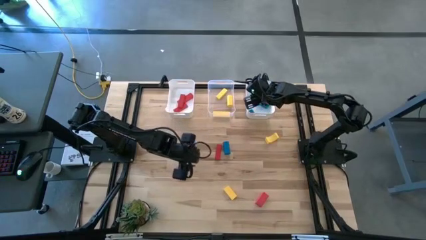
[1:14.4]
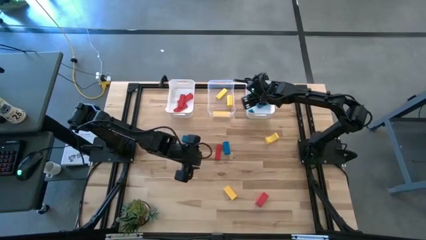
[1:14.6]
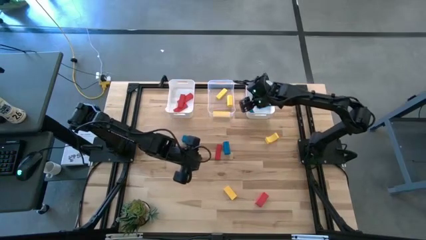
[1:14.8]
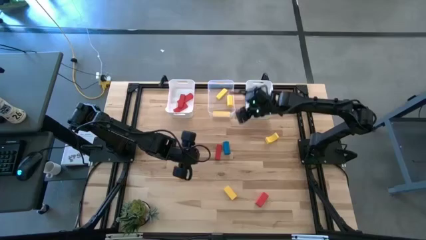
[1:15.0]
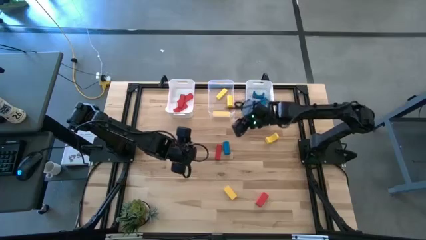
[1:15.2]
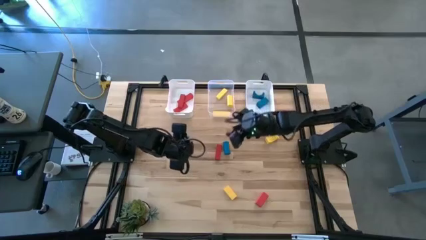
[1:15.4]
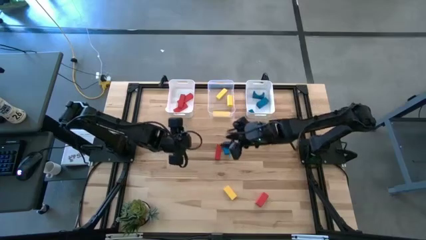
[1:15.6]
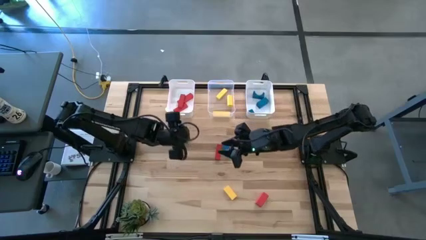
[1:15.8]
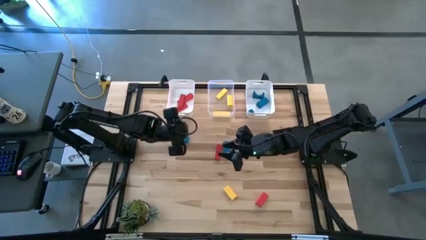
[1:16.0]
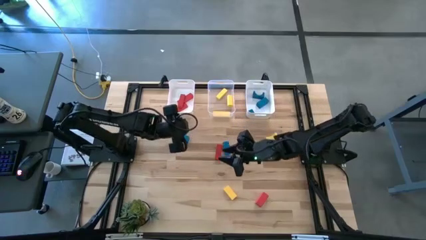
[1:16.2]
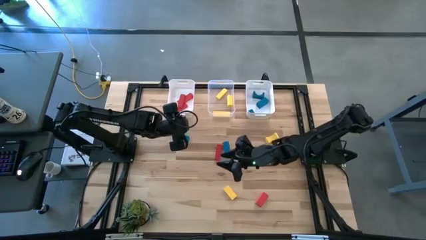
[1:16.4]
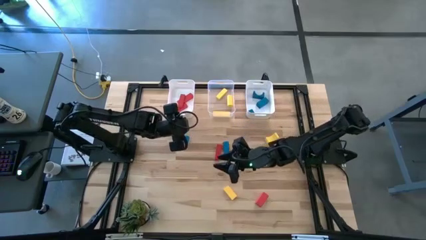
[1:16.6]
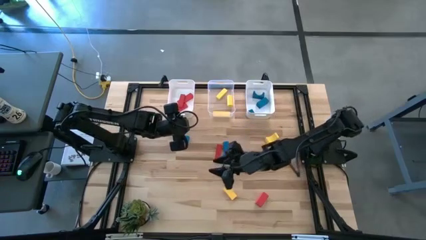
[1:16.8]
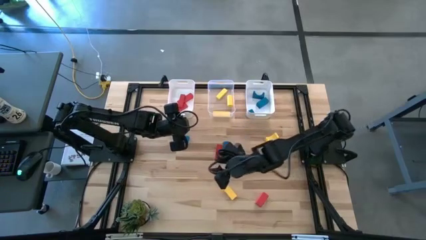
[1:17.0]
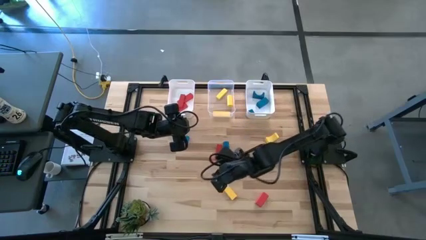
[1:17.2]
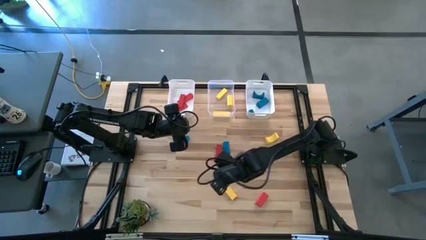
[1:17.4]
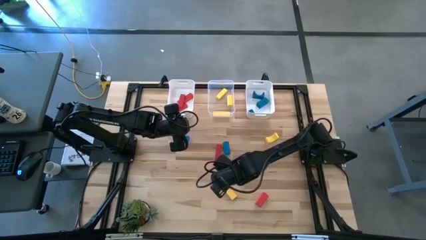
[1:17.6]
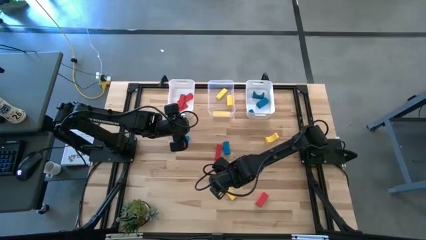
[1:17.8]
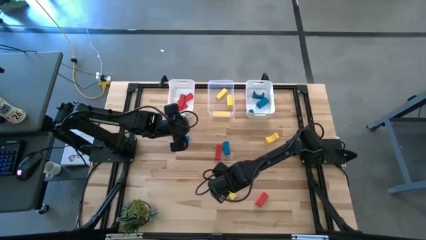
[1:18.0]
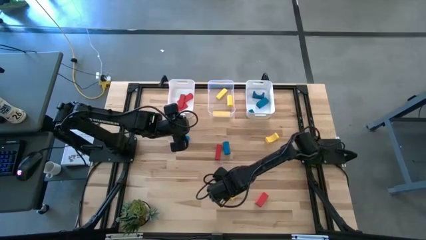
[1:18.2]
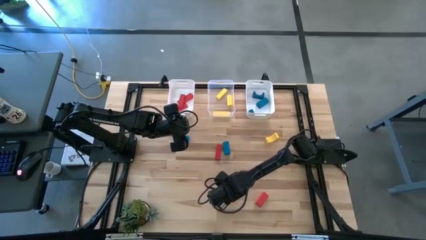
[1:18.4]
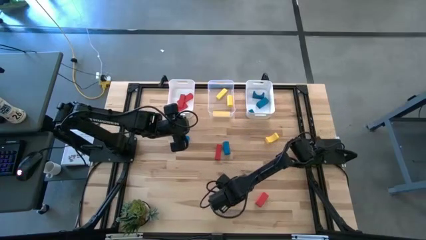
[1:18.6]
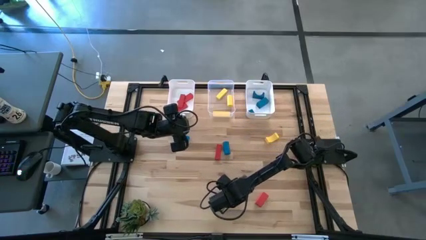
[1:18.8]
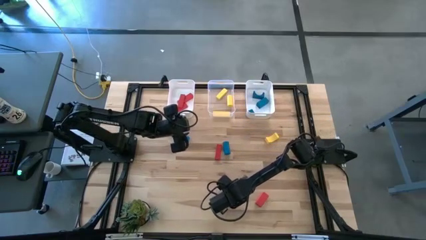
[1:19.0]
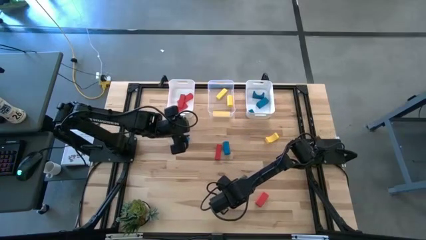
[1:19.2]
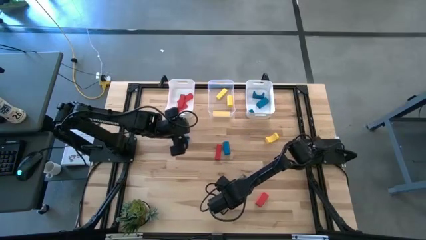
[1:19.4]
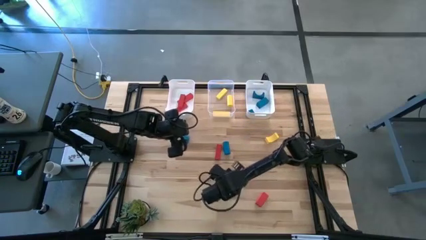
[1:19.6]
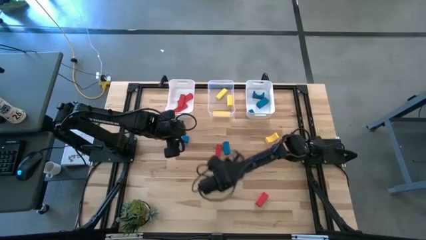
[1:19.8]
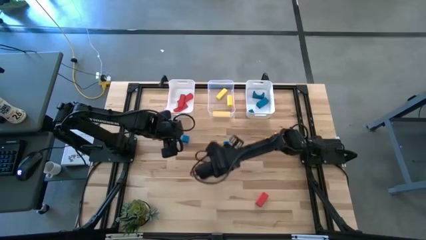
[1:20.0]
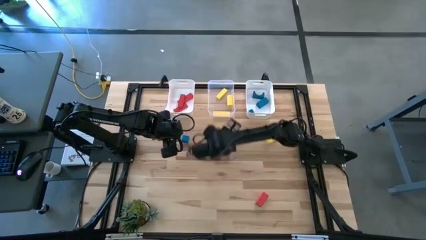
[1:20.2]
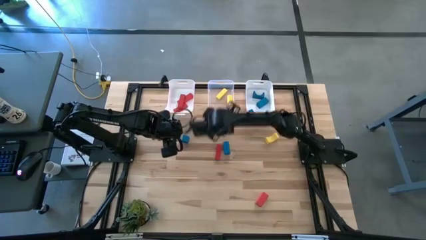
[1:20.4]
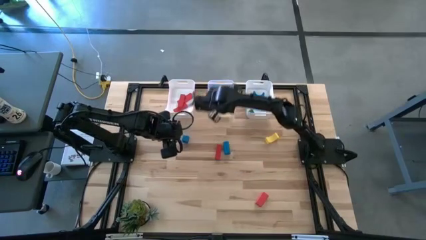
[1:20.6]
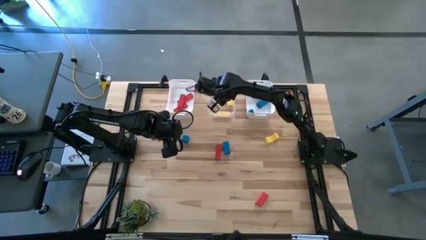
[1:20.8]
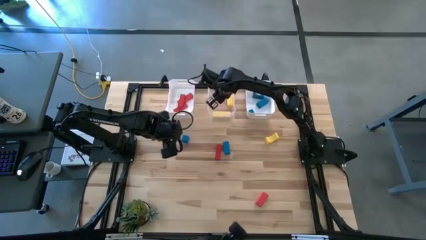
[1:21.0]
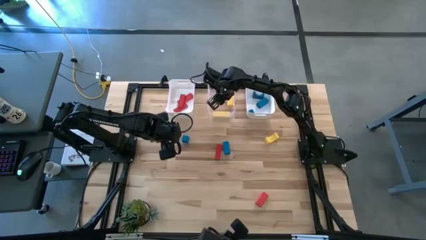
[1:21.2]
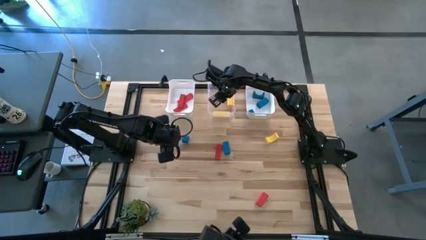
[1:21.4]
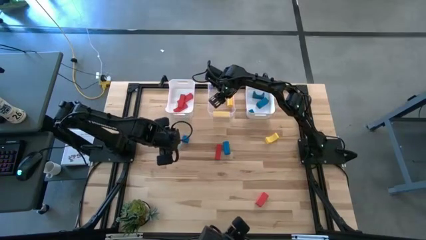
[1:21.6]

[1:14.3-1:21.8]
Task: Sort & place blocks by color
Put the yellow block into the transparent bin

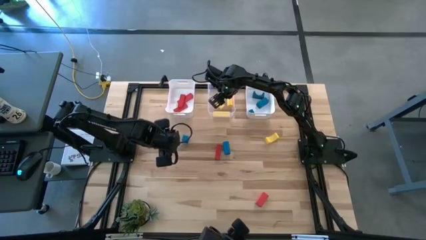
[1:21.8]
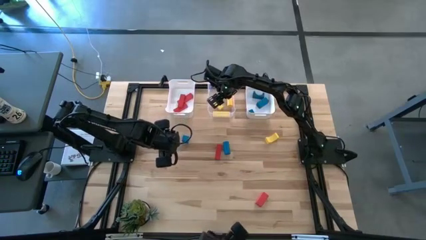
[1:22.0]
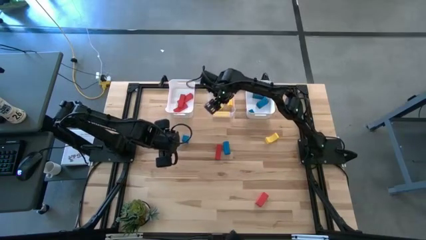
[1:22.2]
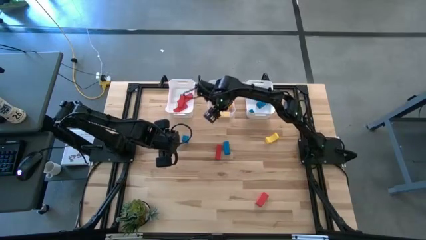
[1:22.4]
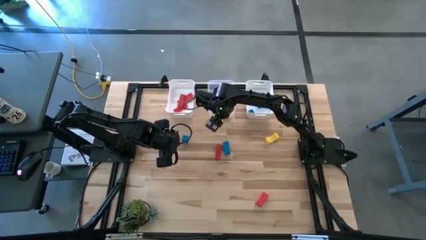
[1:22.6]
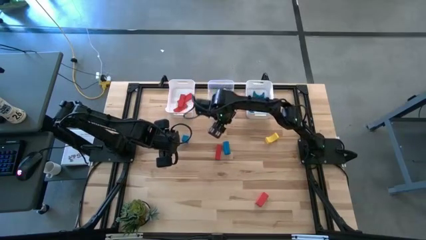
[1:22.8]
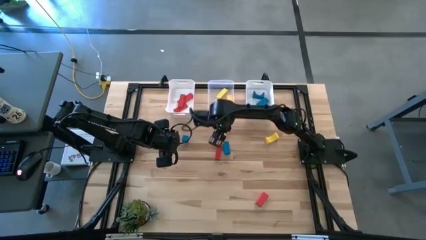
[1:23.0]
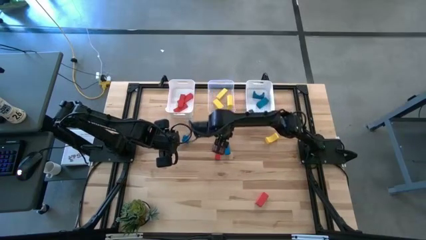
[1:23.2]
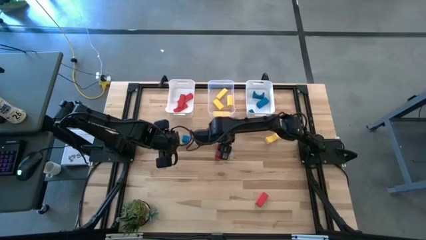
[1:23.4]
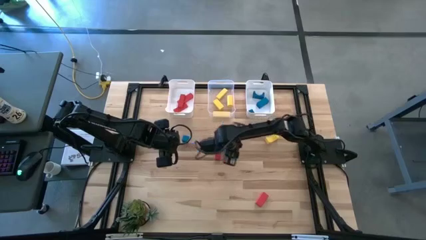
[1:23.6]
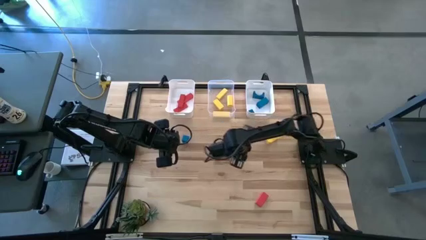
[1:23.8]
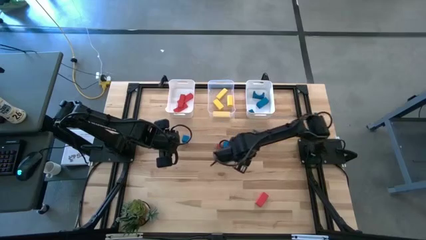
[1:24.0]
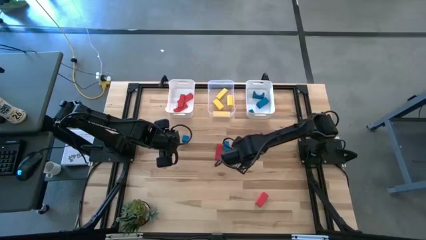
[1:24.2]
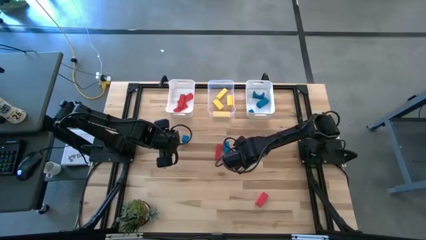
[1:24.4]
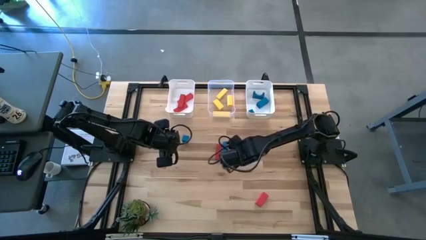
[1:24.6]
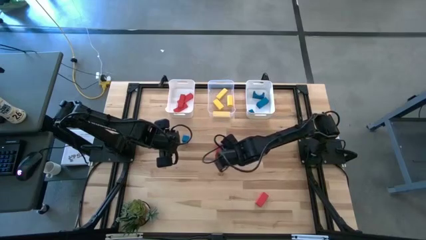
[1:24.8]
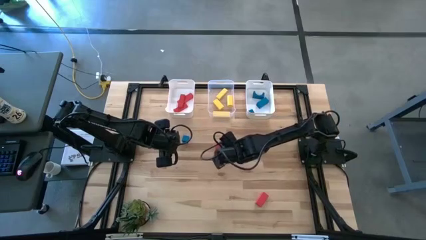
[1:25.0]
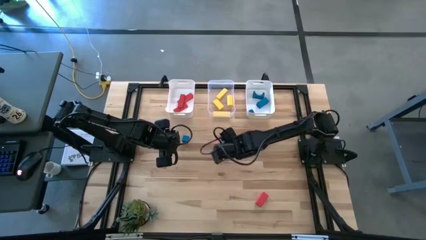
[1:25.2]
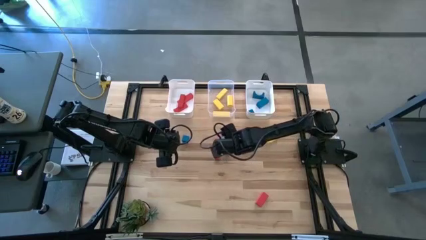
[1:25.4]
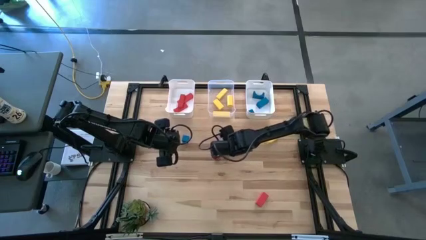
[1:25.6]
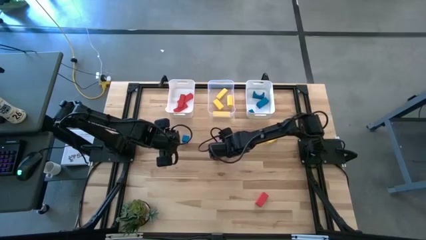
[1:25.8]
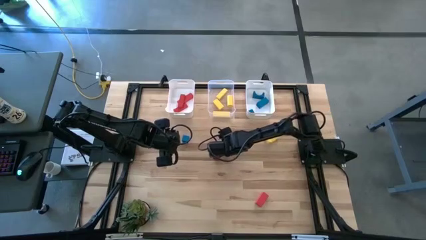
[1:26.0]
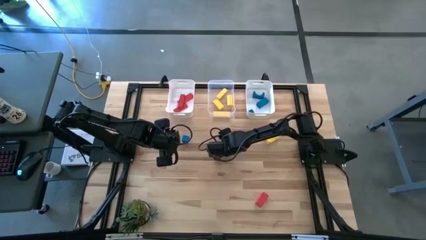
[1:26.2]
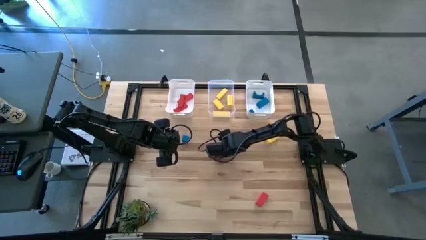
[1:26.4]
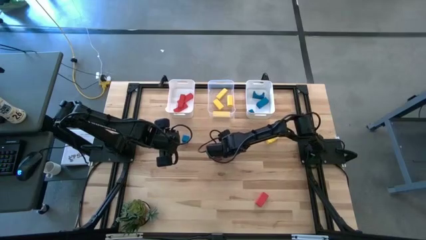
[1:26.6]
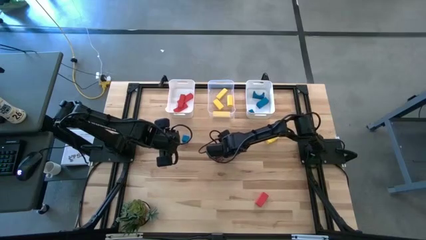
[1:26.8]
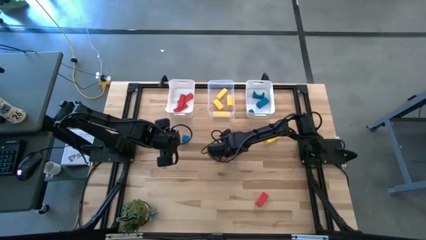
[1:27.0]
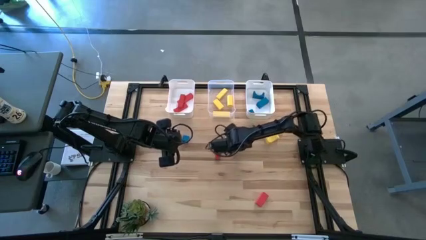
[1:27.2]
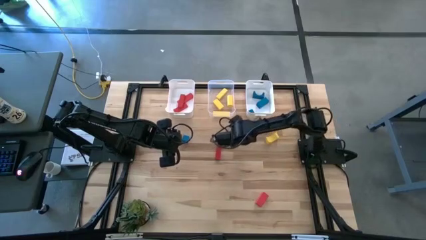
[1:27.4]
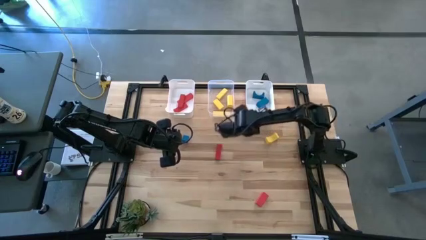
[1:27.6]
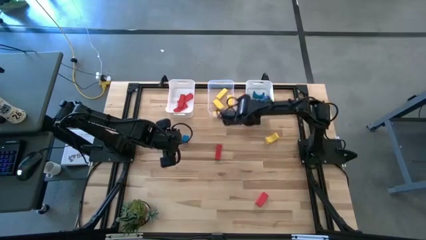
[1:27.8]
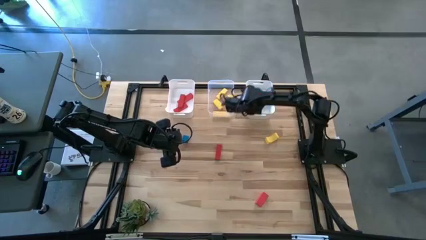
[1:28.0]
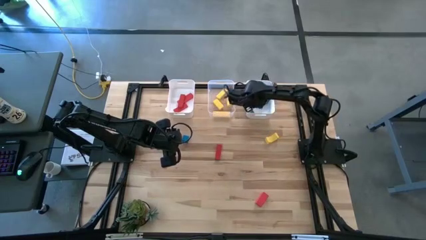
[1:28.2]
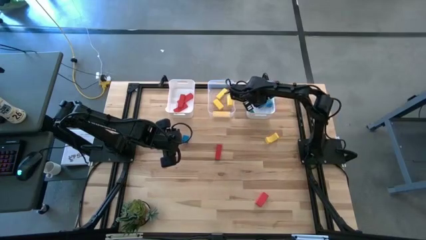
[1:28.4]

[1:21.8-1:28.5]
Put the blue block into the right white bin

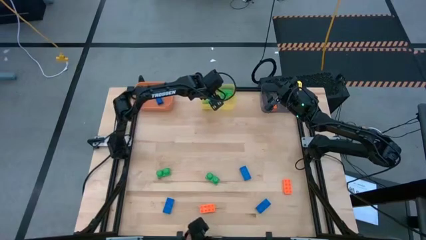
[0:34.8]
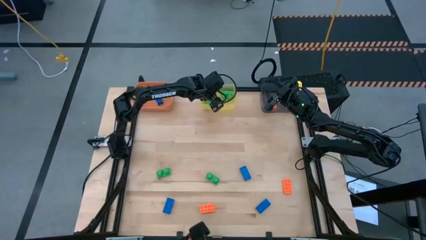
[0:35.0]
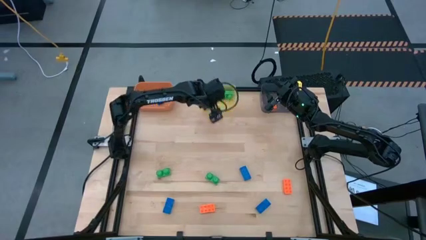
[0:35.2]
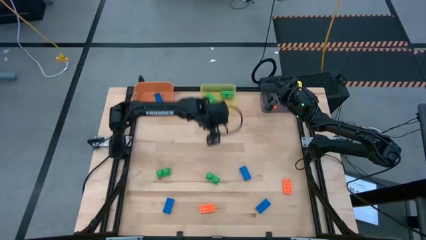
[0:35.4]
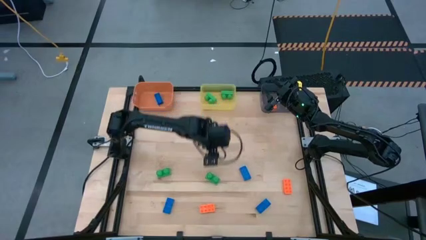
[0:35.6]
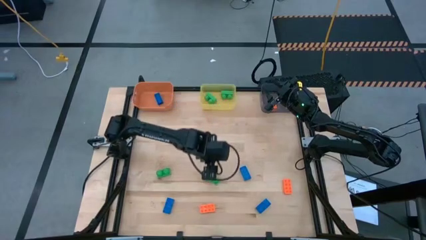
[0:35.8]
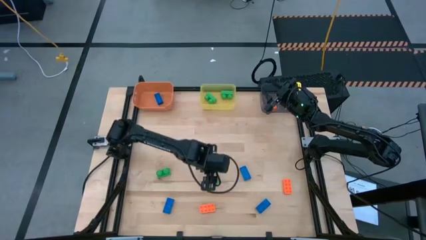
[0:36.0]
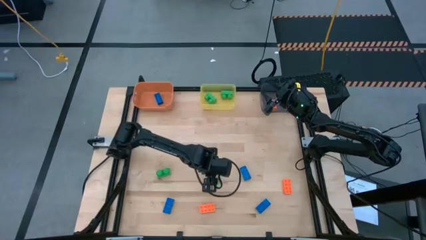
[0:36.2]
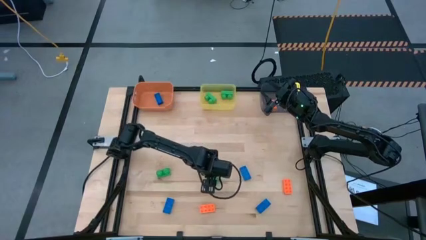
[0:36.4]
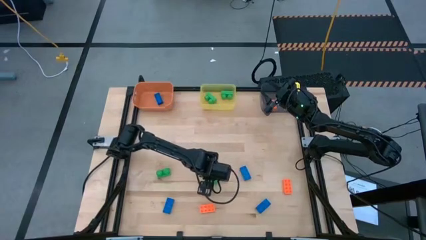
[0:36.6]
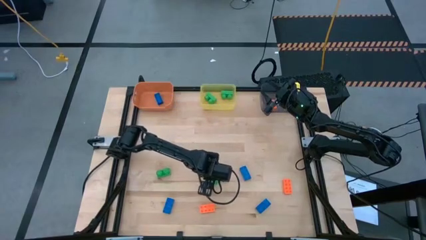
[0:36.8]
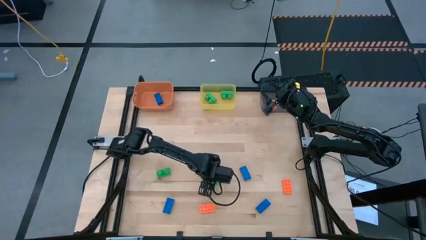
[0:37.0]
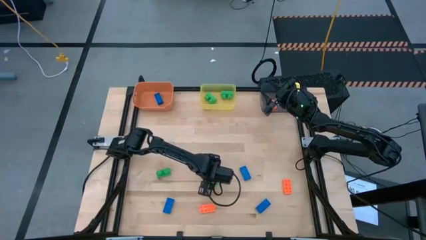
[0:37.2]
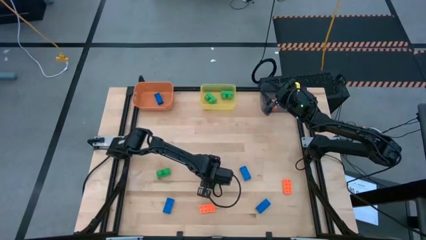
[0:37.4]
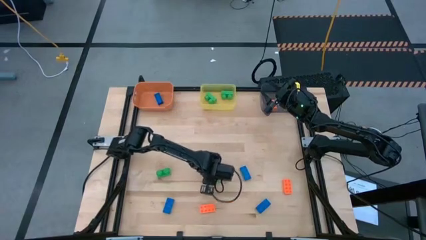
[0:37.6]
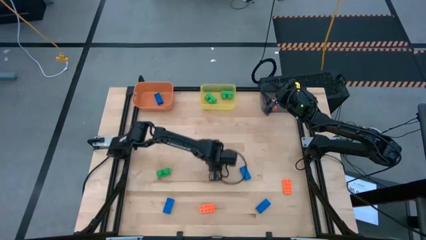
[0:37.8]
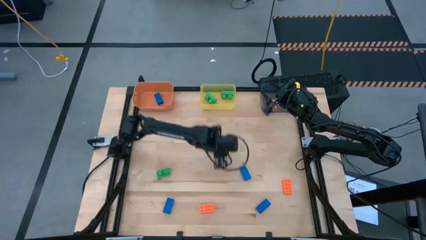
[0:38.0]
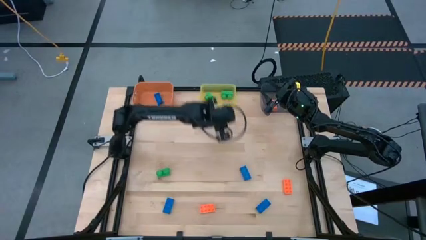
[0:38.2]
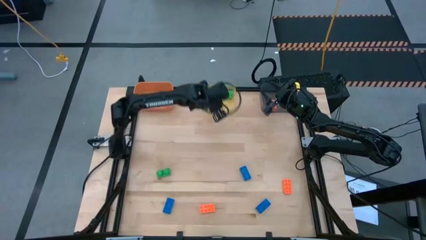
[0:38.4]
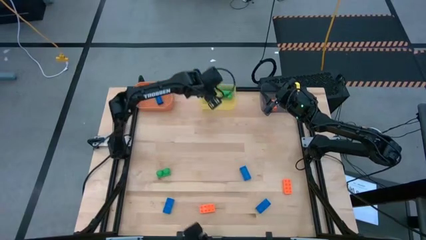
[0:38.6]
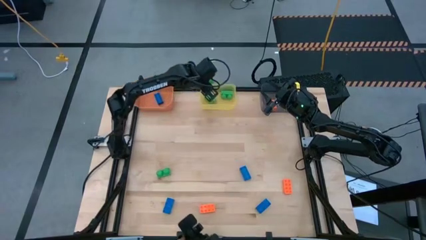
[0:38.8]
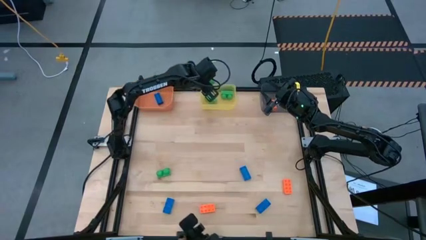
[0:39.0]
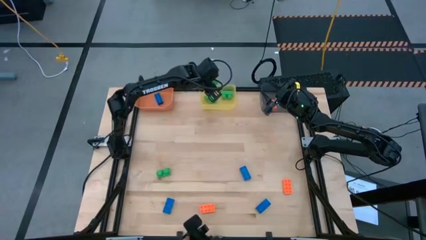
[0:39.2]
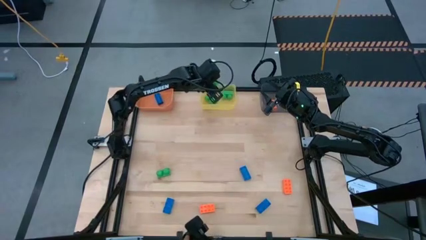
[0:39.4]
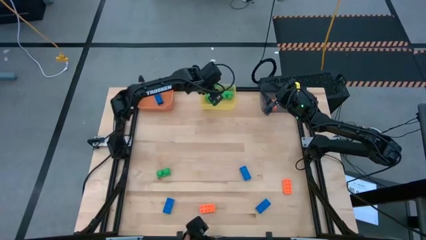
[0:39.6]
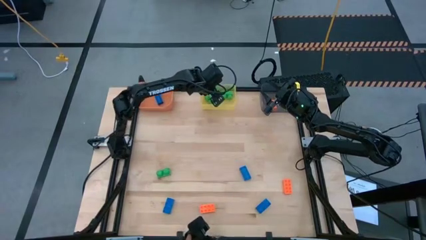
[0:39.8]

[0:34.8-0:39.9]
Task: Sort & place blocks by color
Put the green game piece into the yellow bin
